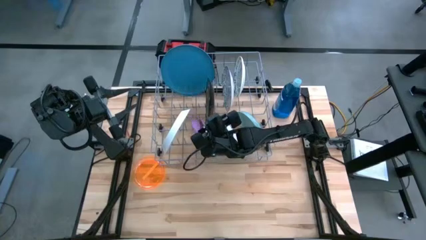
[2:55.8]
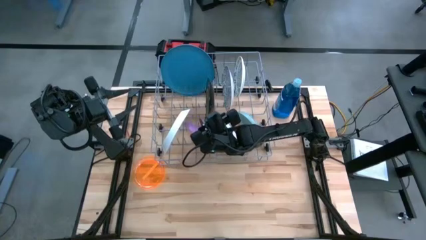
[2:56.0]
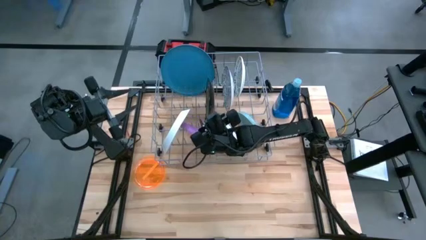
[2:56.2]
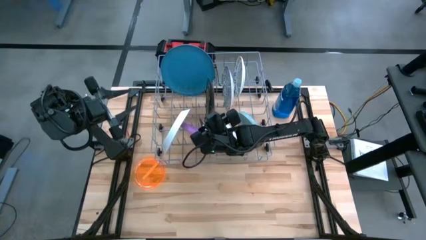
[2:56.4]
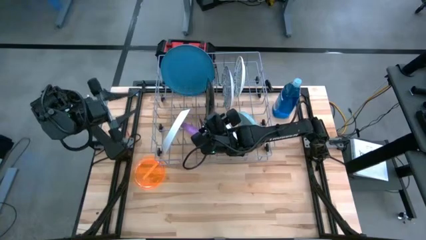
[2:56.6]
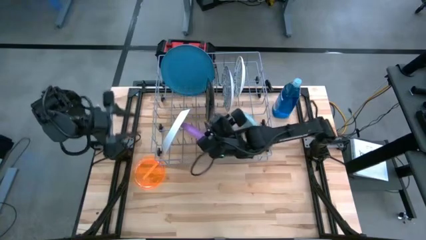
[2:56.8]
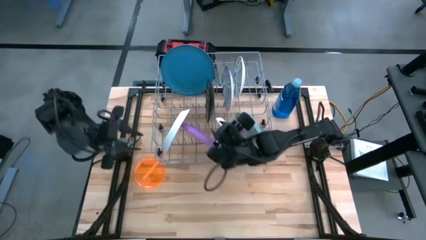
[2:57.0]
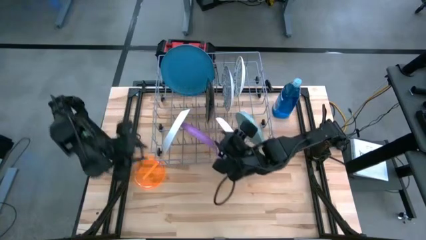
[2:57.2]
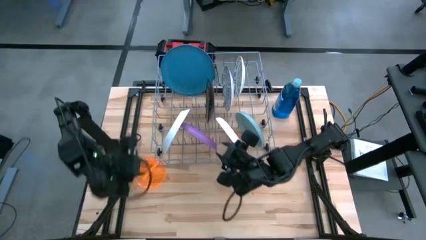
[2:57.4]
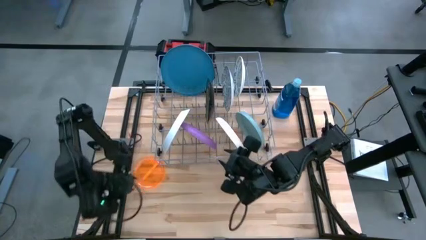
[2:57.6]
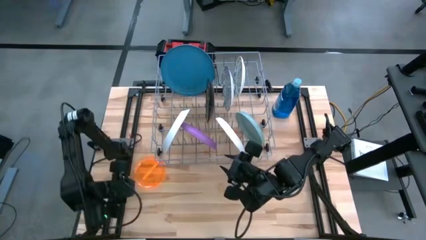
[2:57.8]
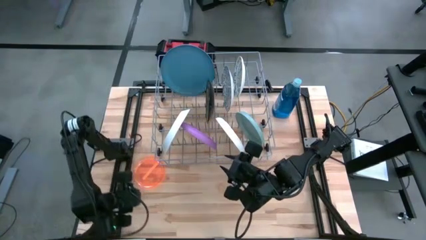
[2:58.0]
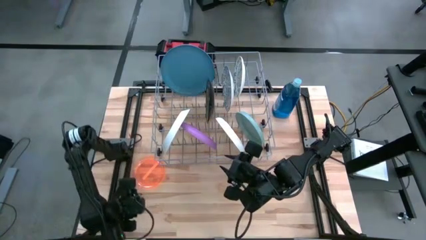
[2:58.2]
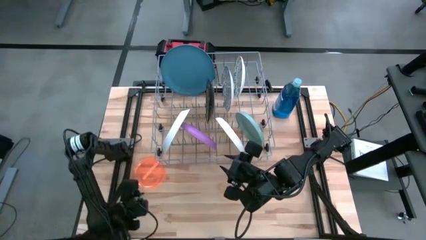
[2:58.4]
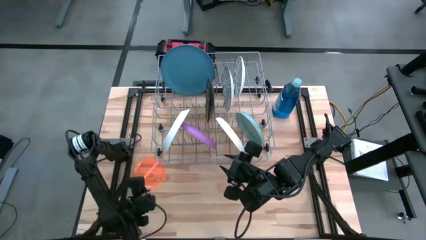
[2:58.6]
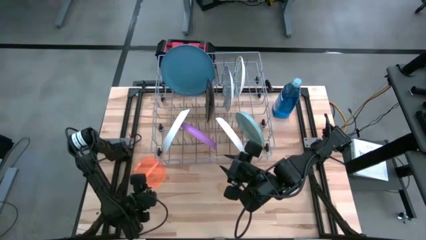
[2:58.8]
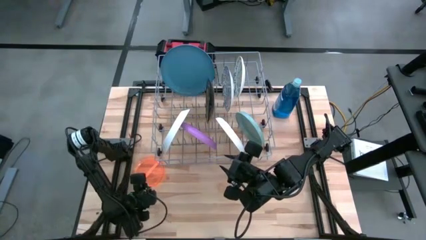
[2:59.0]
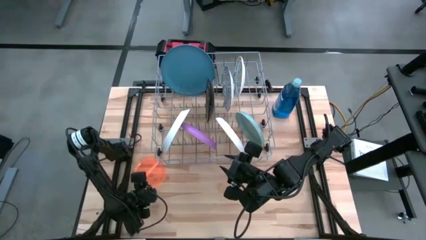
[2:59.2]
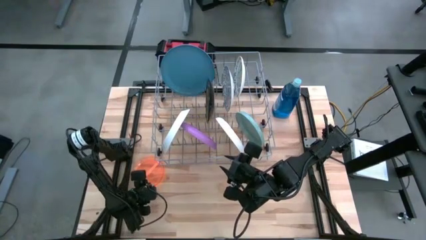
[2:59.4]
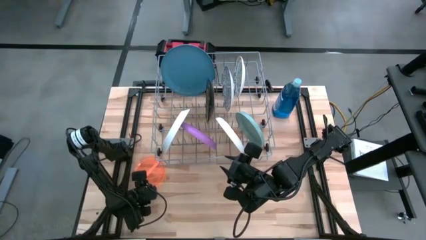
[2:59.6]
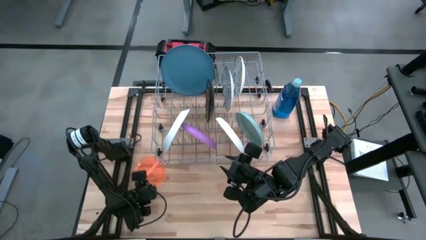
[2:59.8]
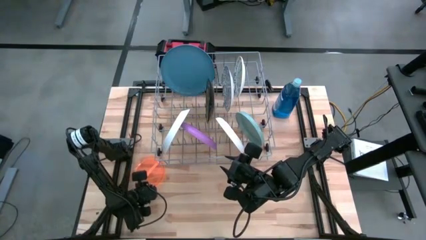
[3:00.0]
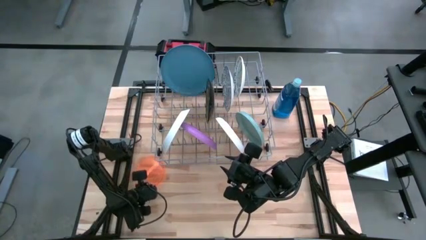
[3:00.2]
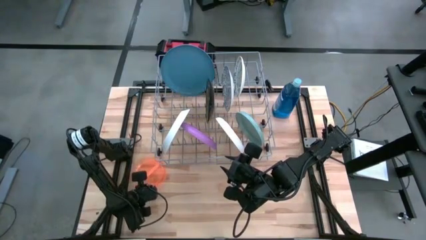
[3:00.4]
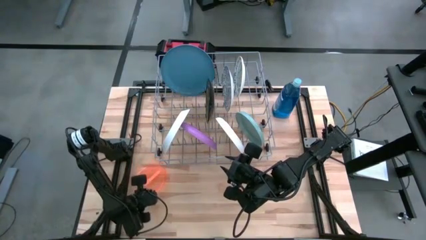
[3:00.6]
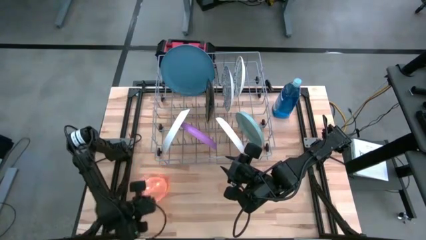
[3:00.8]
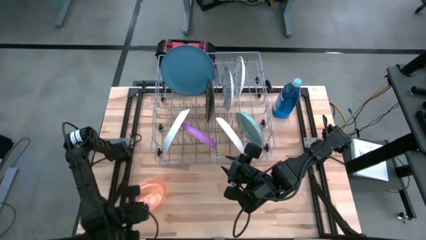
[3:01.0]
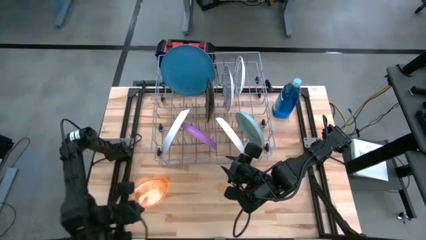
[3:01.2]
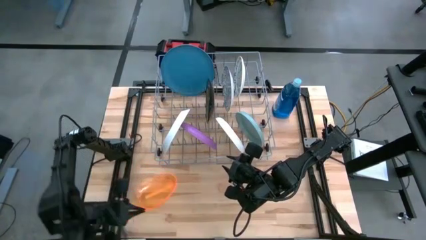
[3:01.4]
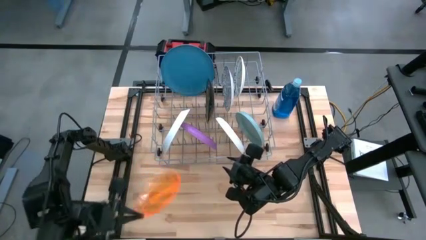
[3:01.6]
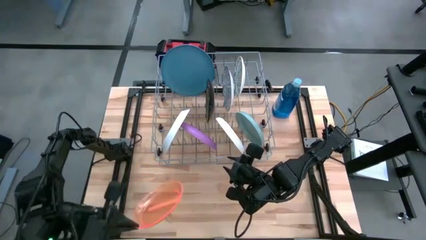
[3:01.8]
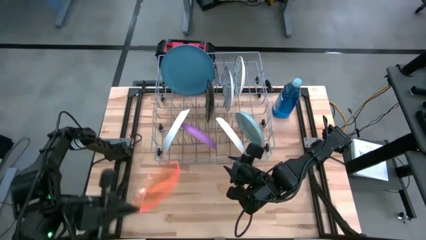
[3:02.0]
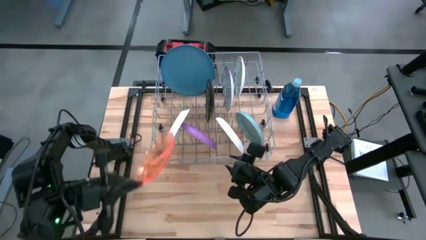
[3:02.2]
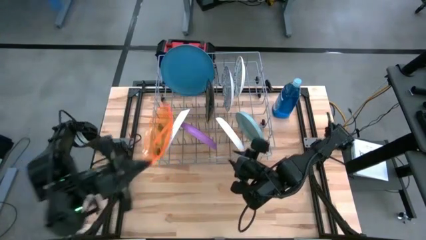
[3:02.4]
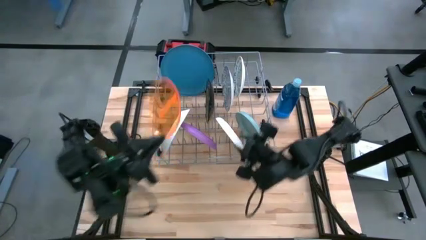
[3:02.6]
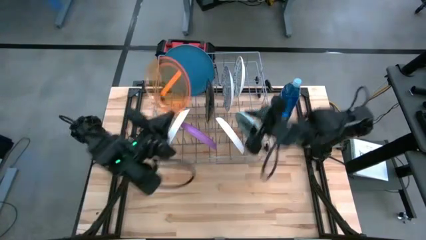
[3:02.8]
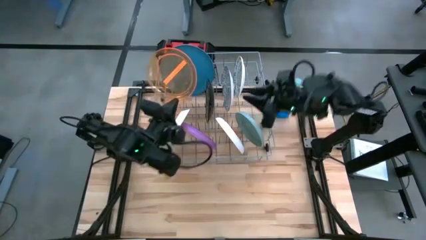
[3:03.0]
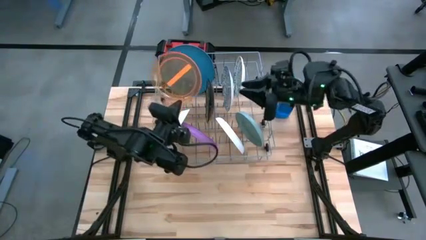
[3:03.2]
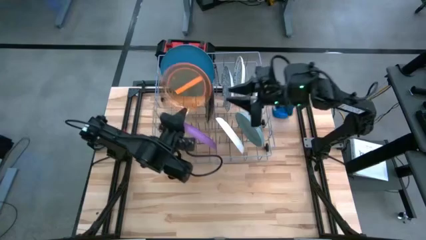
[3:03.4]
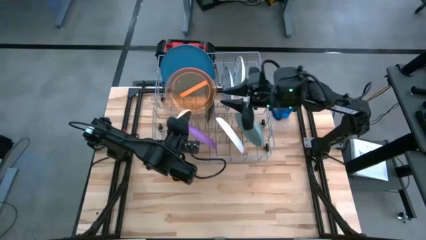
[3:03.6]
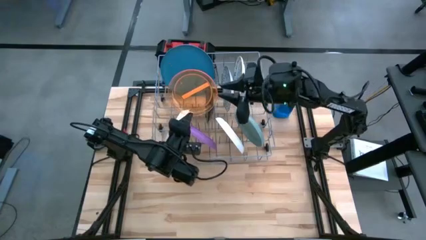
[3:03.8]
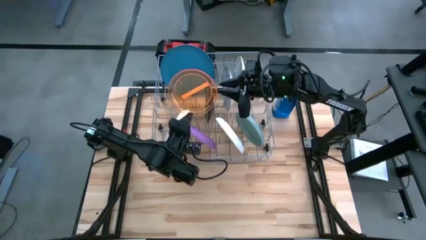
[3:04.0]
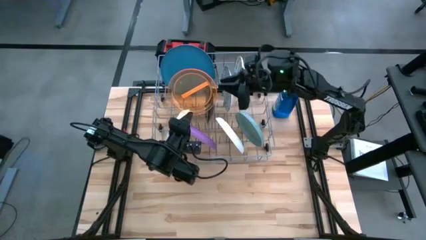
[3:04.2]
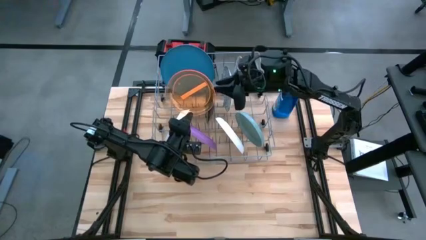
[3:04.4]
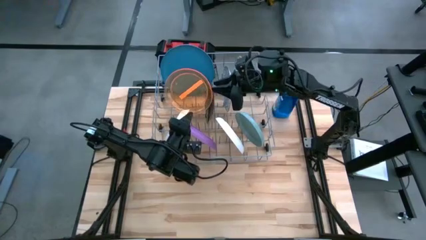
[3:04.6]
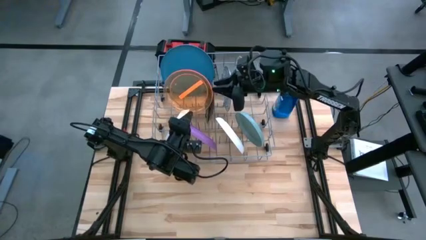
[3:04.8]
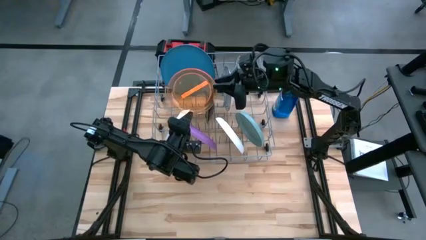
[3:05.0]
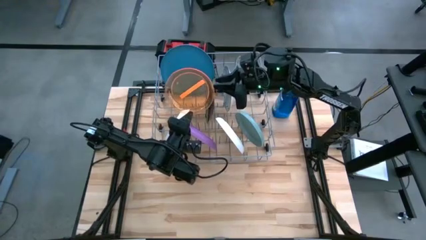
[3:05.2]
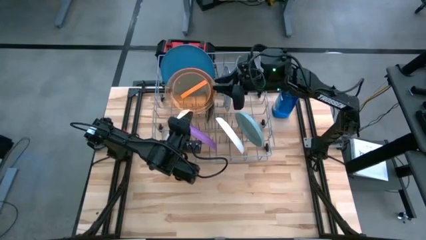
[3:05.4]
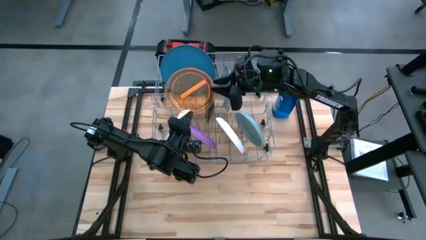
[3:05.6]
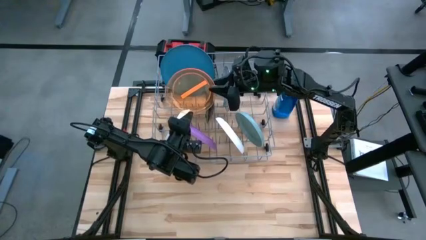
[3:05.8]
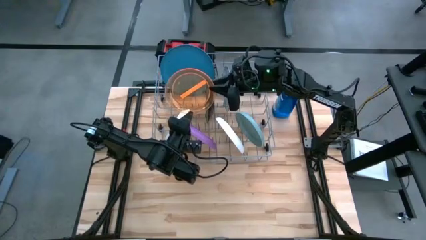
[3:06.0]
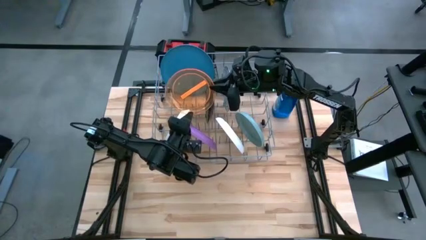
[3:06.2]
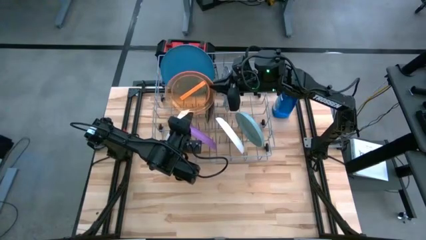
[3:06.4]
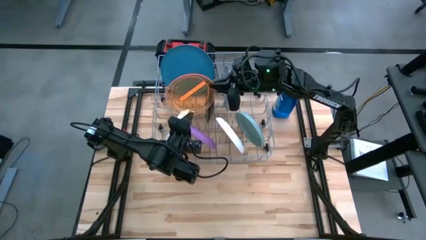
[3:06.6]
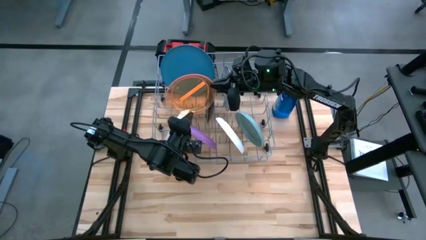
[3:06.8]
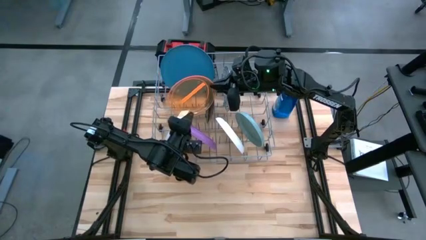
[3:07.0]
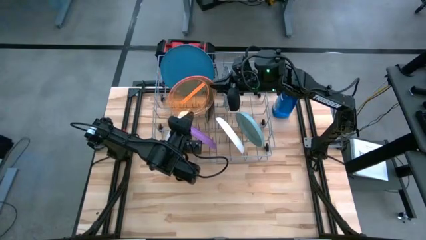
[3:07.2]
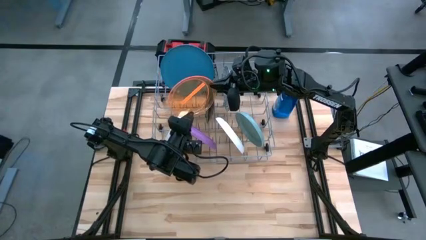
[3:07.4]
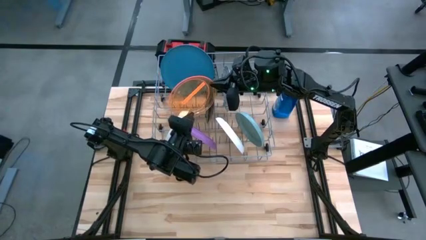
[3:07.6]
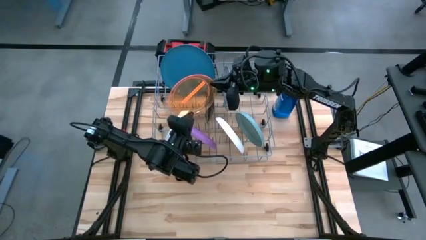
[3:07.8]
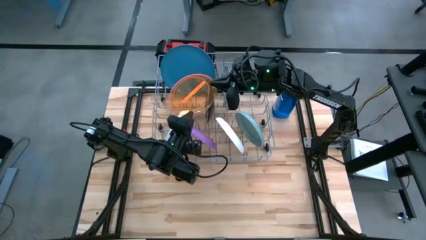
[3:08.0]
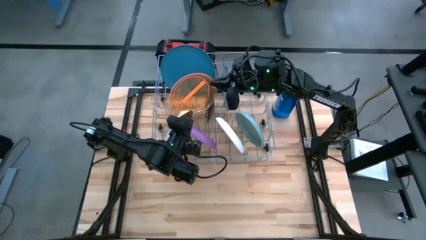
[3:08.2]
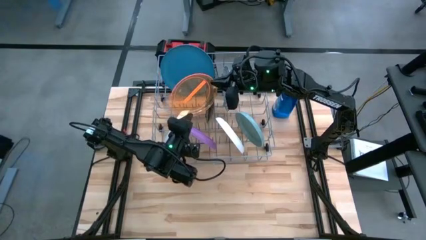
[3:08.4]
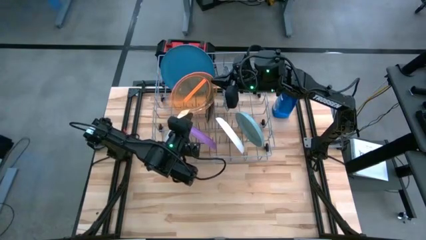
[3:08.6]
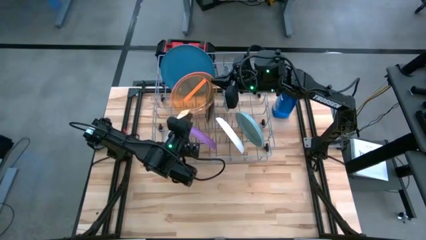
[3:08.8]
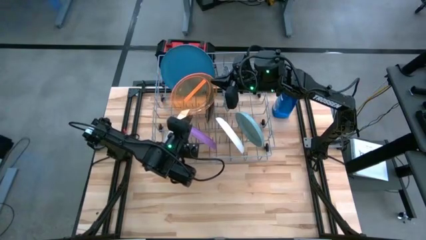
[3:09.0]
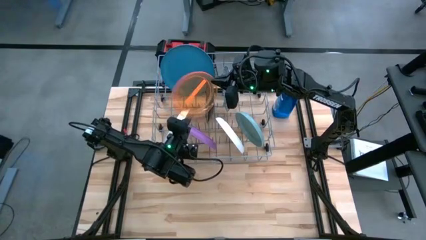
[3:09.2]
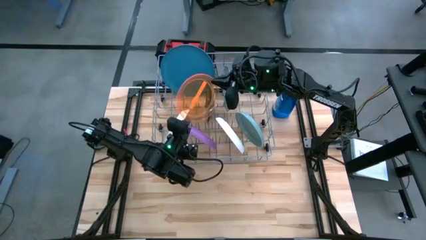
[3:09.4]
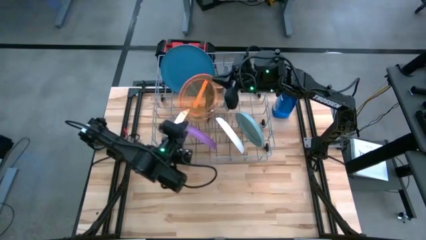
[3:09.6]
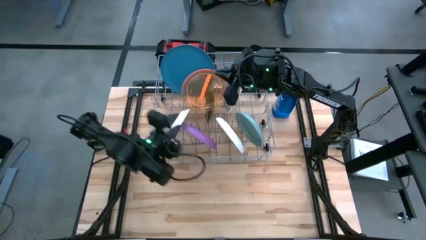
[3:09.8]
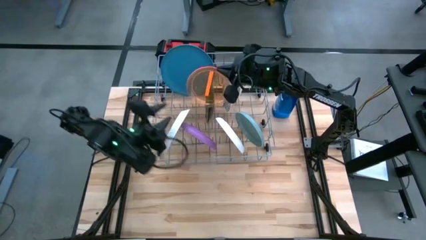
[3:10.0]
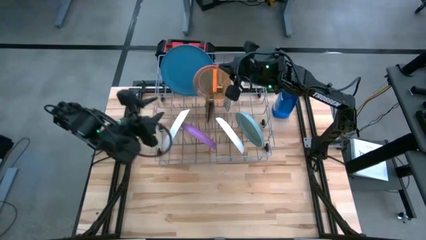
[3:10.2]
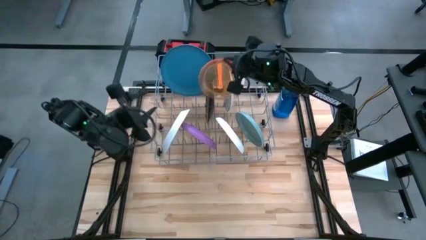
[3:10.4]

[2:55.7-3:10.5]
Task: Sort dishes
Put the orange plate in the dish rack
